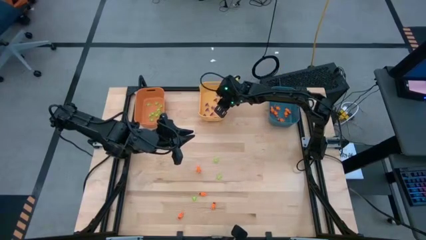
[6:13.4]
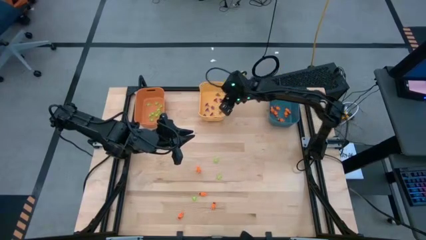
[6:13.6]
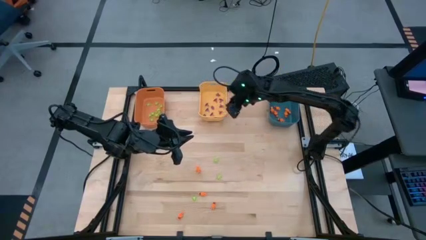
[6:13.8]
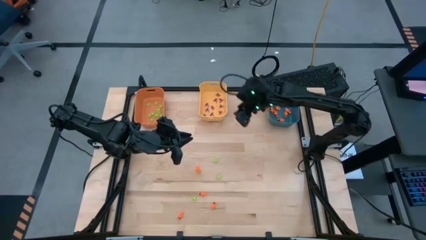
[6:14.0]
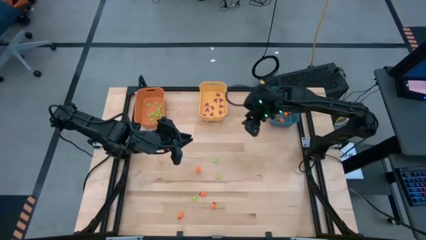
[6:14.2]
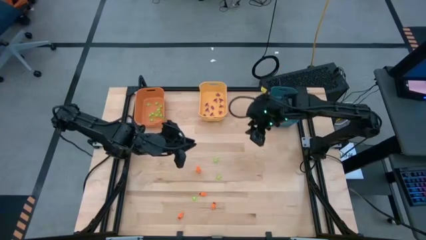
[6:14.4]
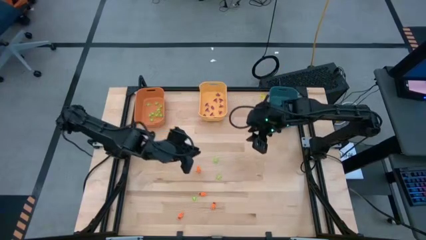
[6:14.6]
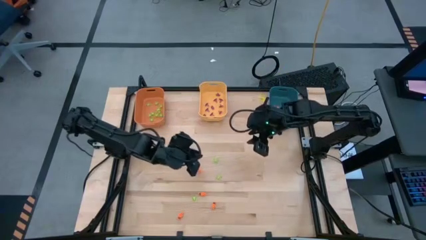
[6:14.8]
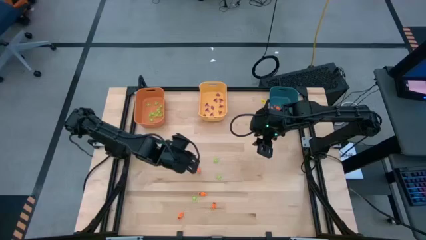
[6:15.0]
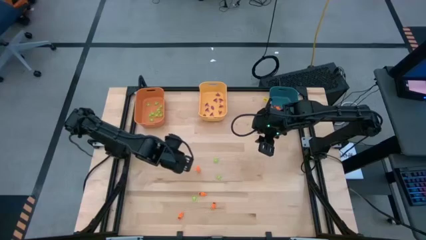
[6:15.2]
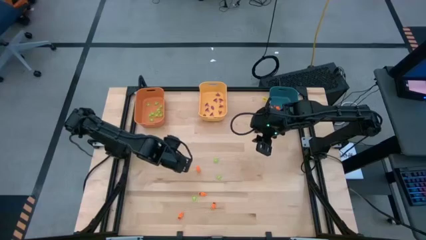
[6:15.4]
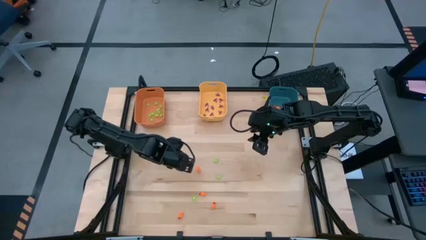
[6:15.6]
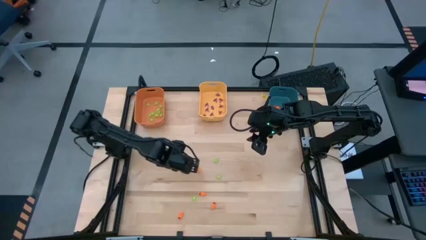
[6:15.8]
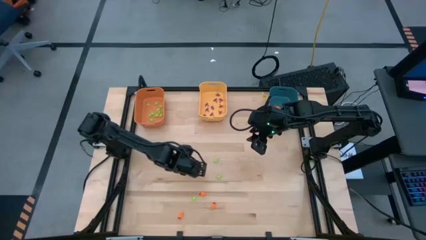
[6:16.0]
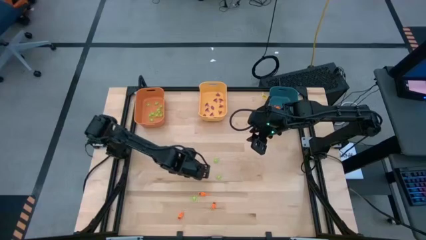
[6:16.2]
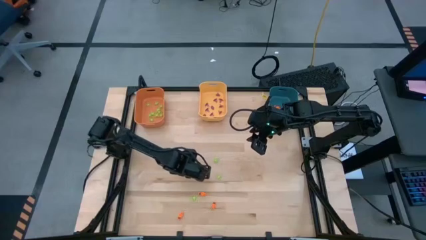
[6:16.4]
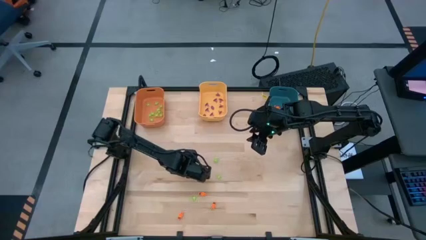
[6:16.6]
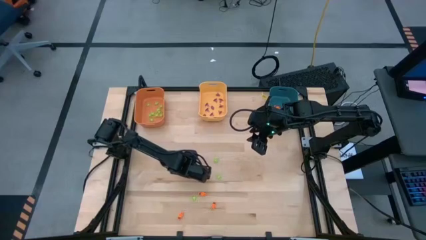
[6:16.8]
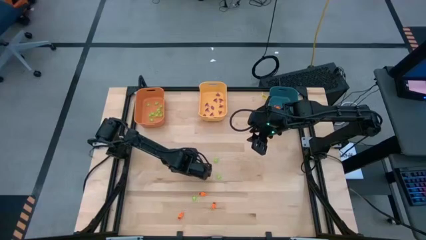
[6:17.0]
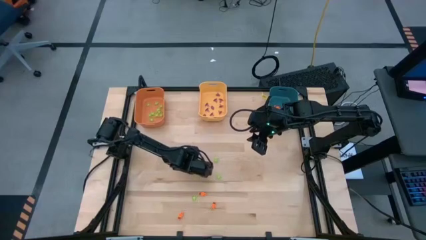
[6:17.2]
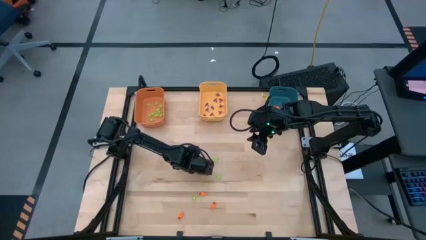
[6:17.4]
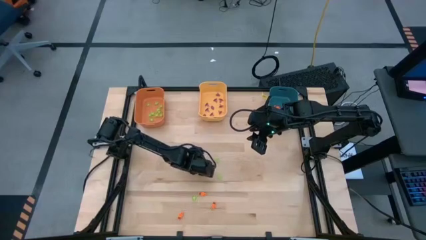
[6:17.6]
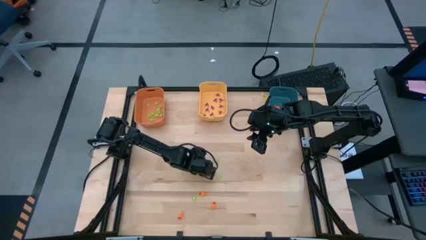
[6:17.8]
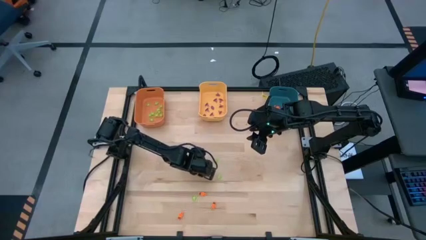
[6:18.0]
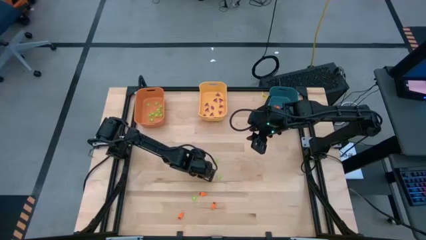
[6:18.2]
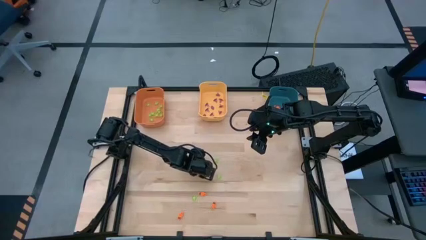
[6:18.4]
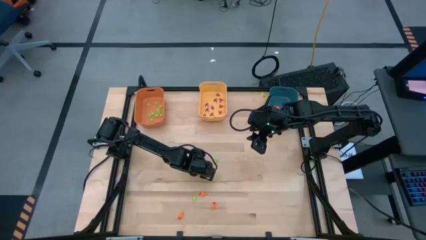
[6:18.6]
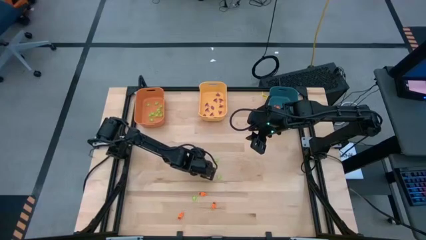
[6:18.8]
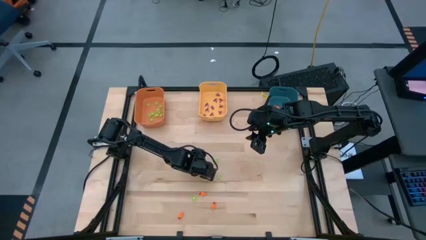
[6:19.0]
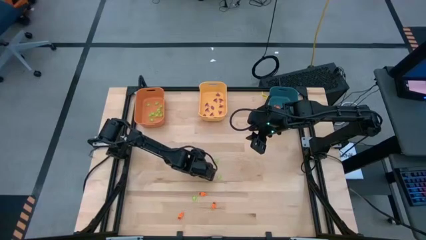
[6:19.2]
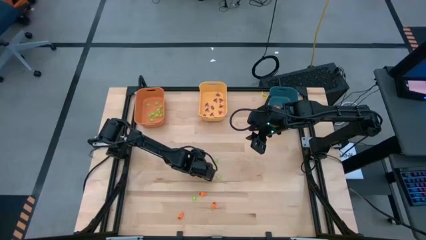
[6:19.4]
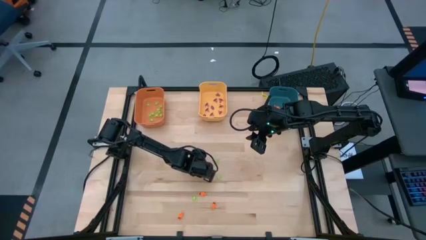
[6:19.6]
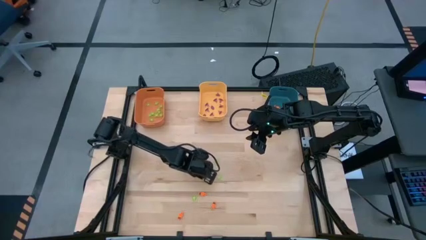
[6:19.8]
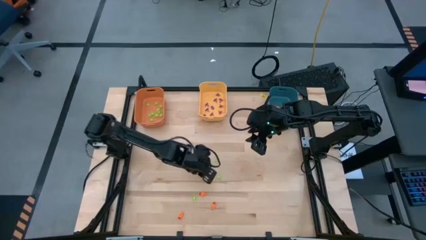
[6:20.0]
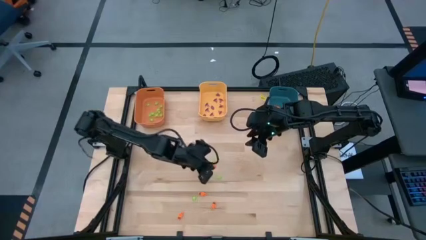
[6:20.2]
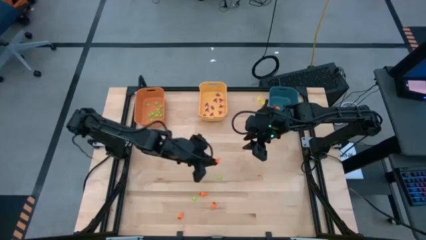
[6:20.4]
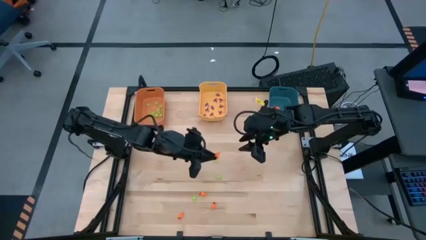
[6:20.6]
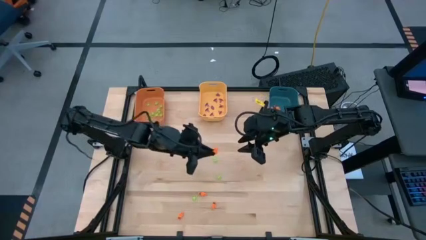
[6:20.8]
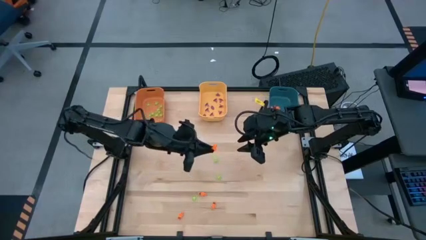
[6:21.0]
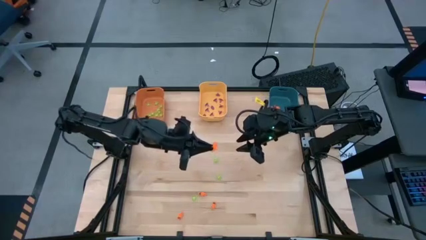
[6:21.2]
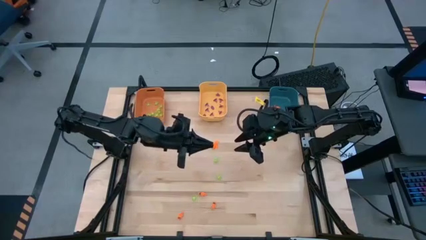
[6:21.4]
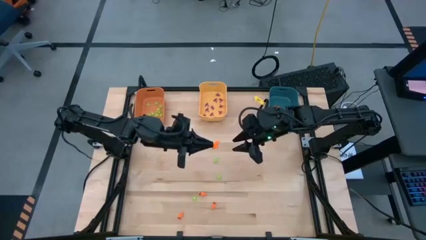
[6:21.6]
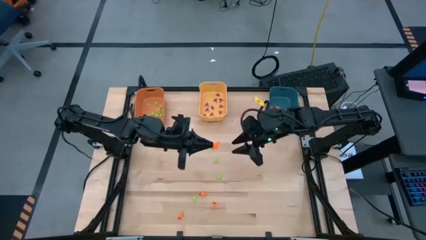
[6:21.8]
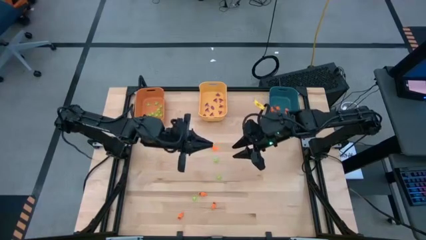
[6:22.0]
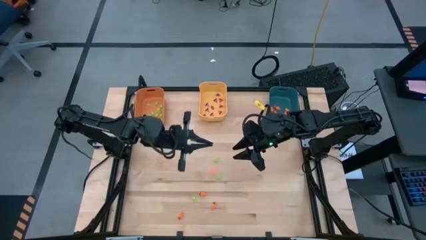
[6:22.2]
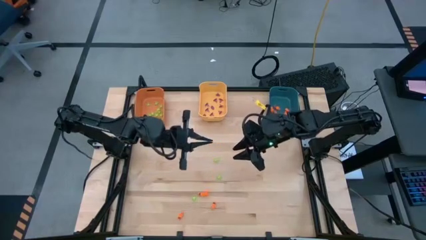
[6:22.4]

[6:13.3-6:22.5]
Task: Sort Halloween decoration
Put the orange skeleton toy into the blue bin

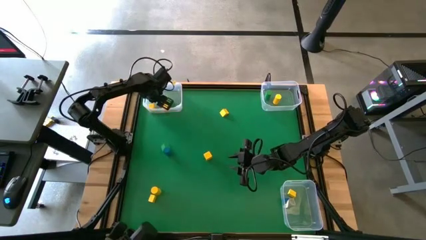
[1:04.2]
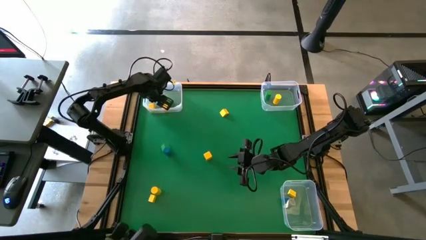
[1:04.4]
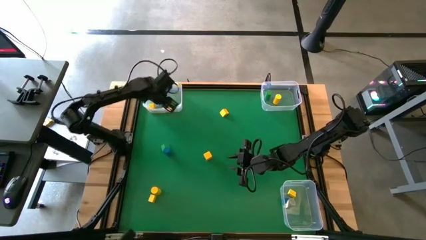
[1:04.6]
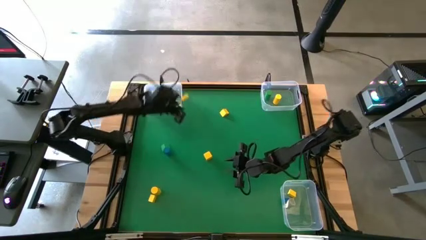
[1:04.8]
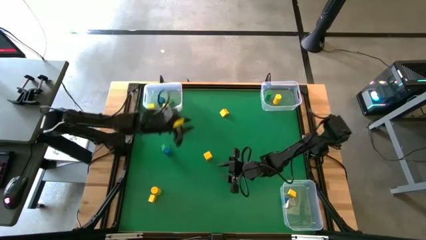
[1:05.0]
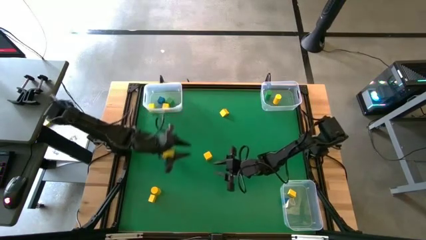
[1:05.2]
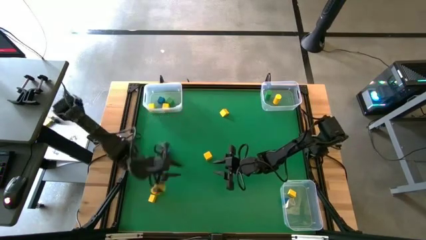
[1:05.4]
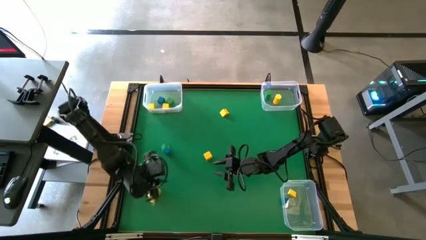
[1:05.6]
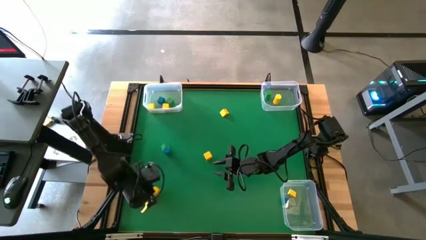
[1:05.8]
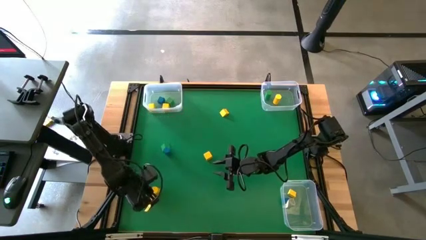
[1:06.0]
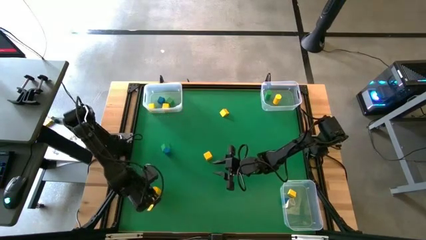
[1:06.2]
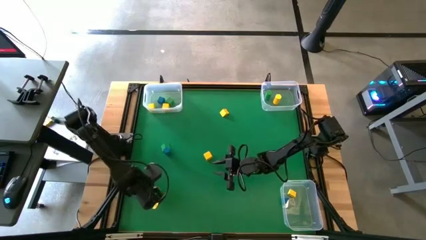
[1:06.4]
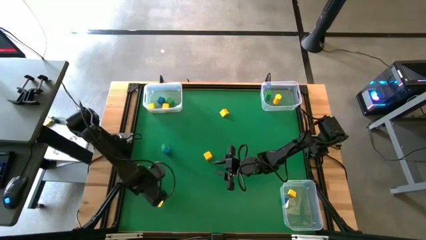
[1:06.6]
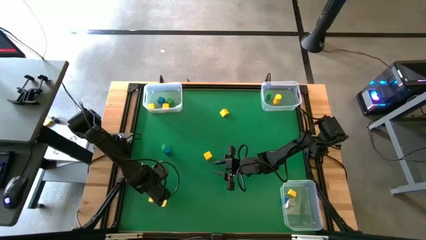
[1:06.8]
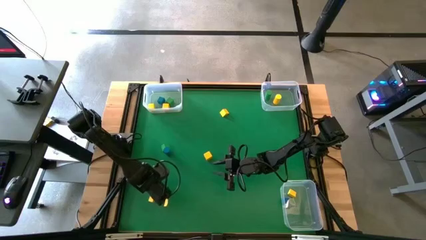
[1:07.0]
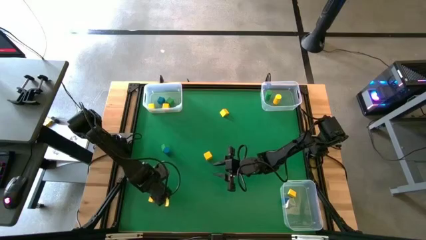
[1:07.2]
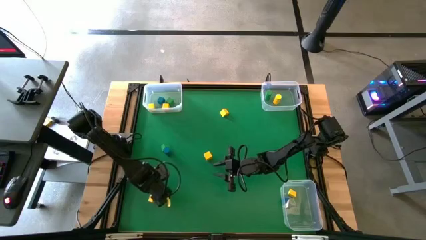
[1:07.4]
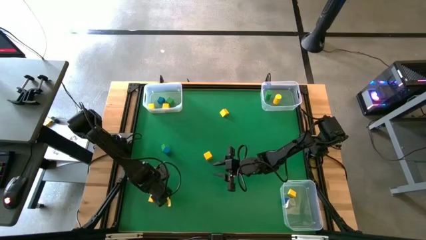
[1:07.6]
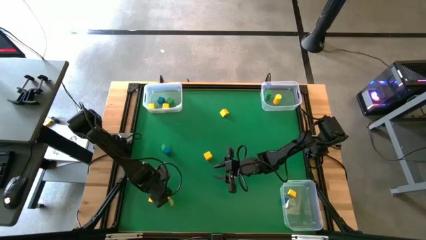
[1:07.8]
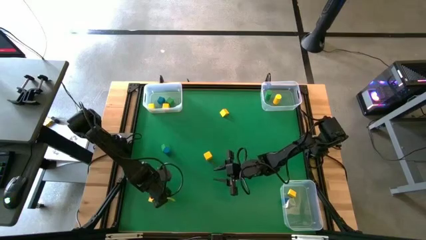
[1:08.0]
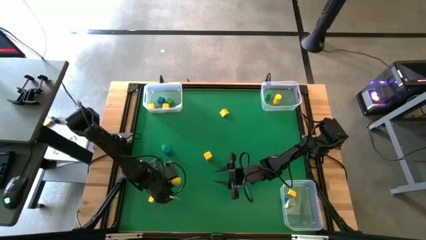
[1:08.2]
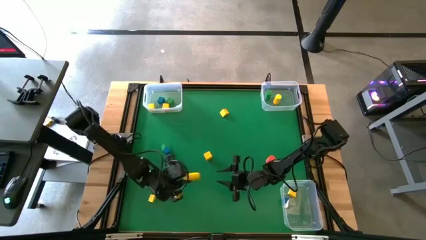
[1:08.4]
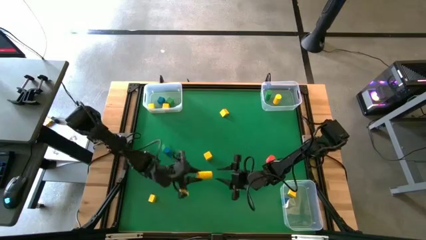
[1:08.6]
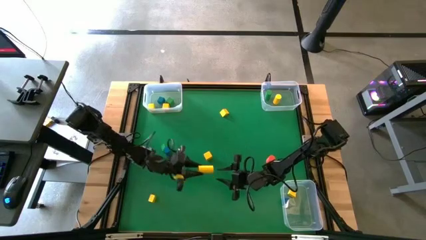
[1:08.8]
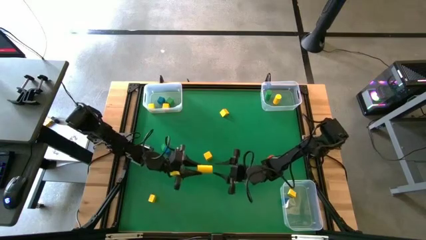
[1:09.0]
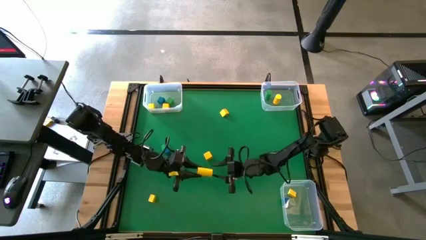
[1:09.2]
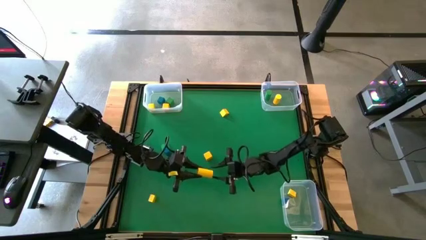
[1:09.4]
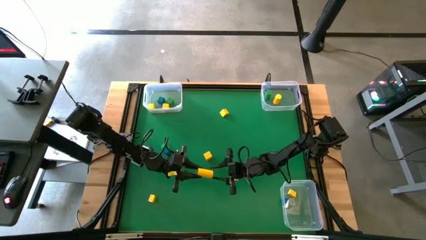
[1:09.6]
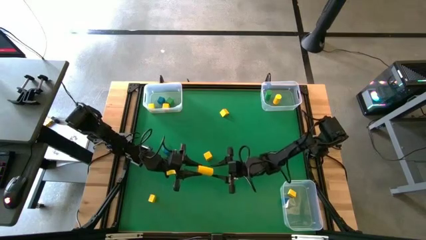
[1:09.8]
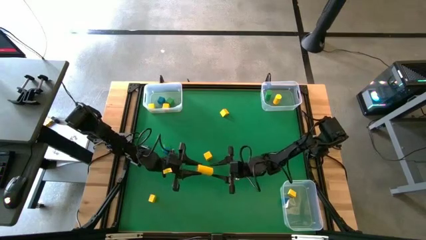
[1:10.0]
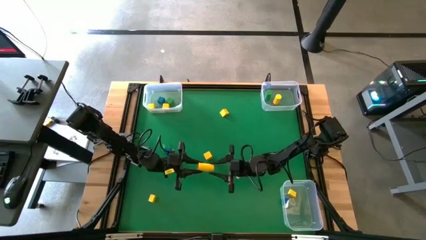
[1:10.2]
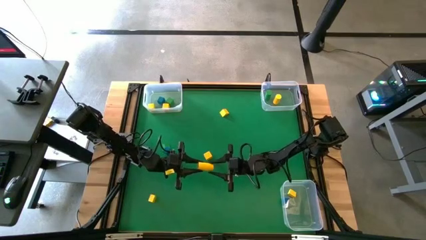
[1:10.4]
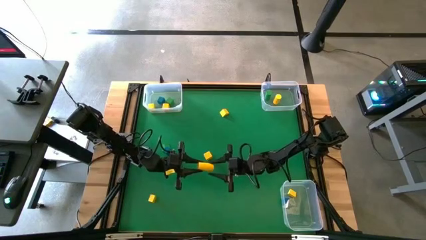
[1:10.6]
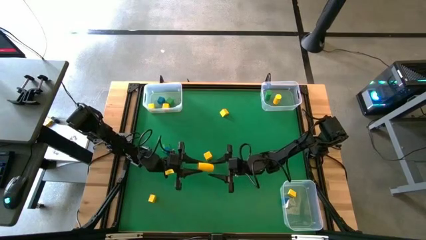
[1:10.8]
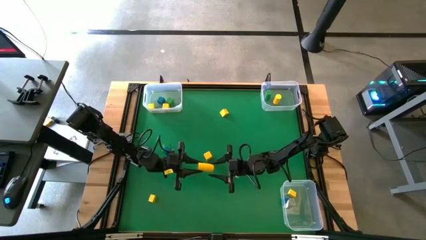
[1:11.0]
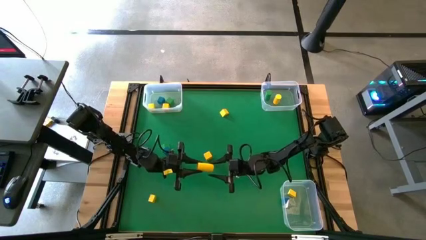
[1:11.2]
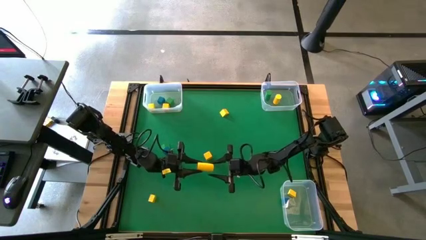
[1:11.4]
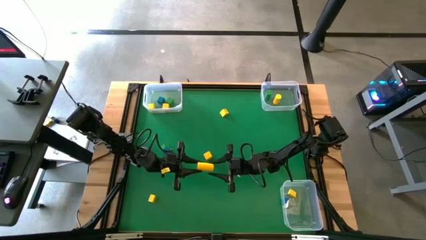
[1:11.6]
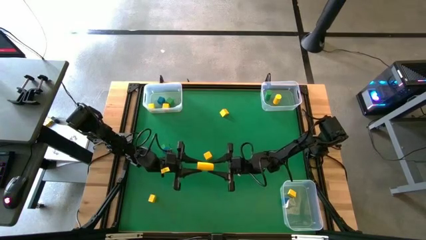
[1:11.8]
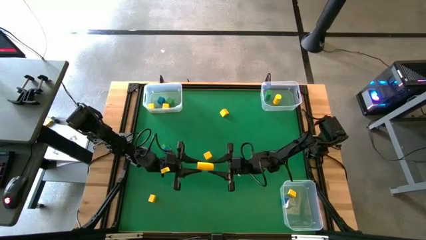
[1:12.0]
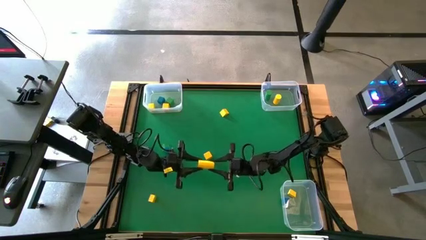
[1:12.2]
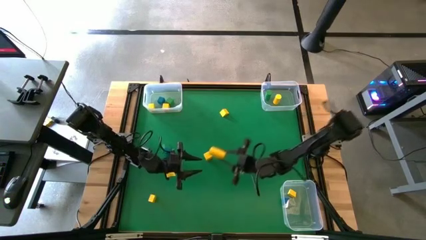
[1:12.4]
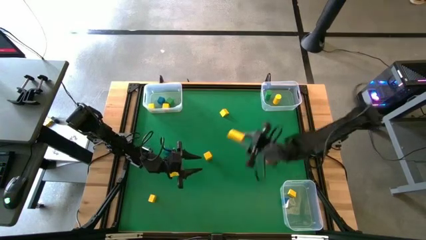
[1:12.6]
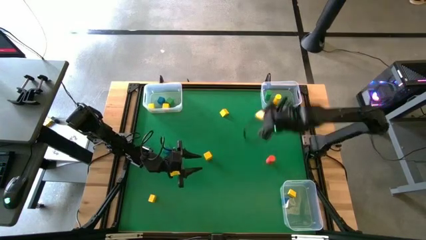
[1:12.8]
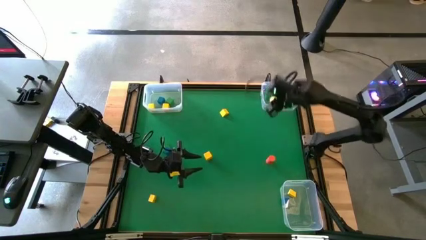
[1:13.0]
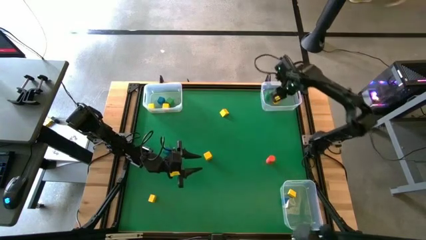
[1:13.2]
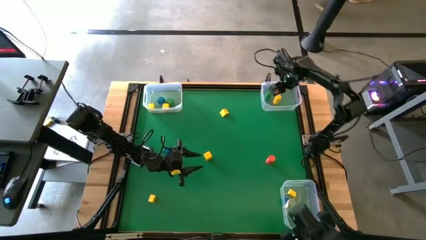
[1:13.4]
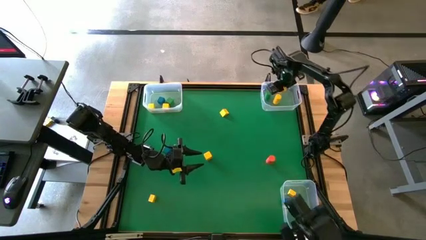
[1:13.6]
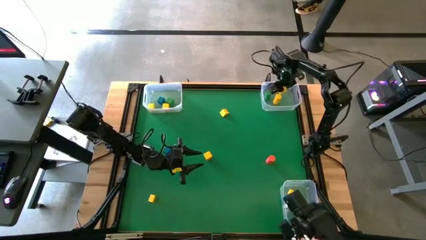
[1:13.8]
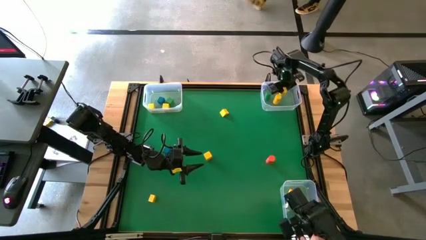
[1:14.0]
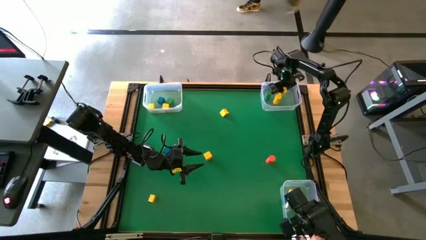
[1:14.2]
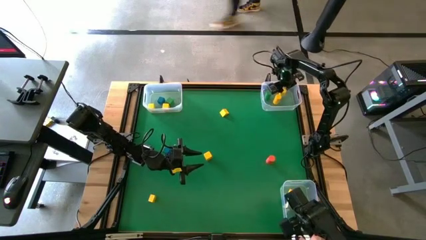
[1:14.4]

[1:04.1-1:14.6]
Task: Sort blocks by size
Put the yellow cylindrical block into the top right transparent bin
